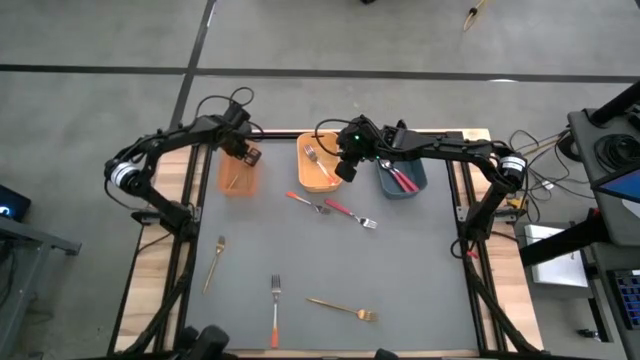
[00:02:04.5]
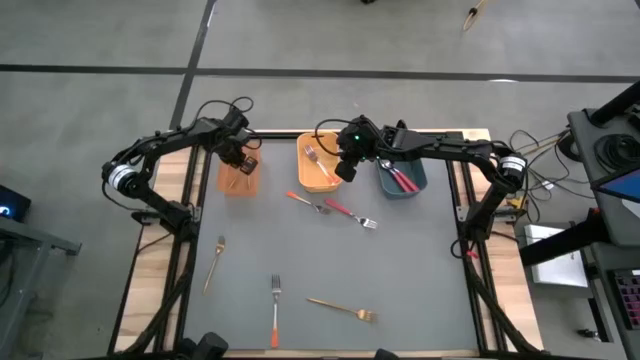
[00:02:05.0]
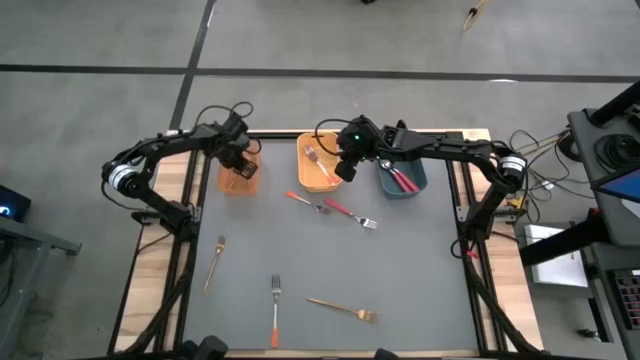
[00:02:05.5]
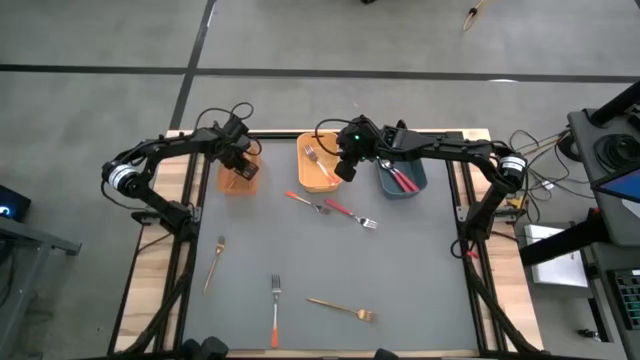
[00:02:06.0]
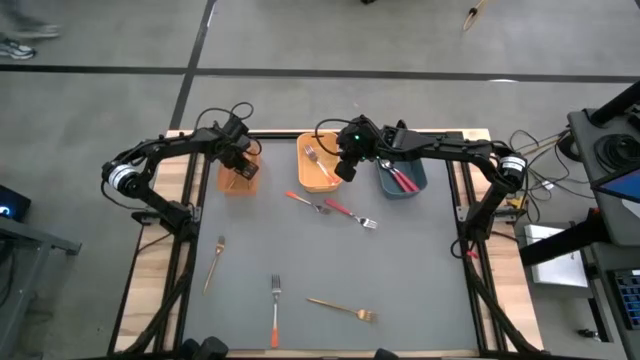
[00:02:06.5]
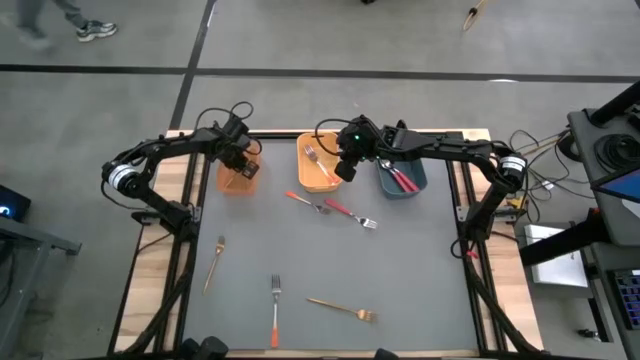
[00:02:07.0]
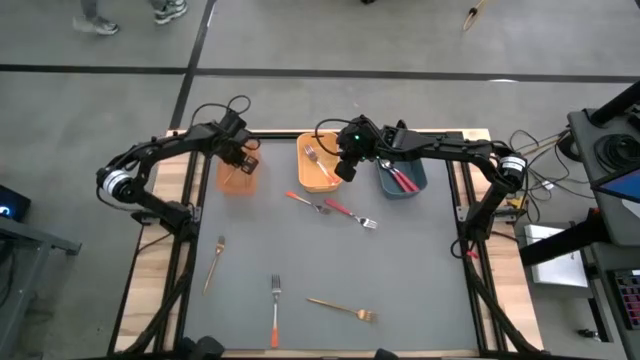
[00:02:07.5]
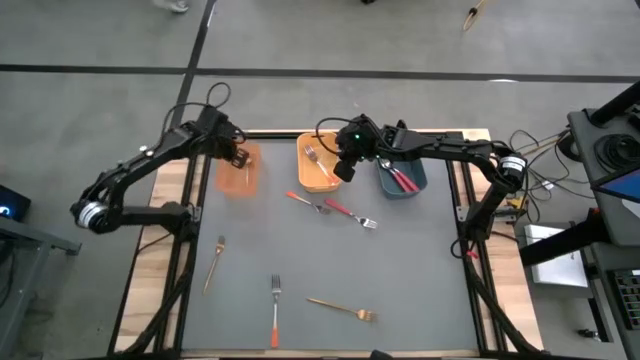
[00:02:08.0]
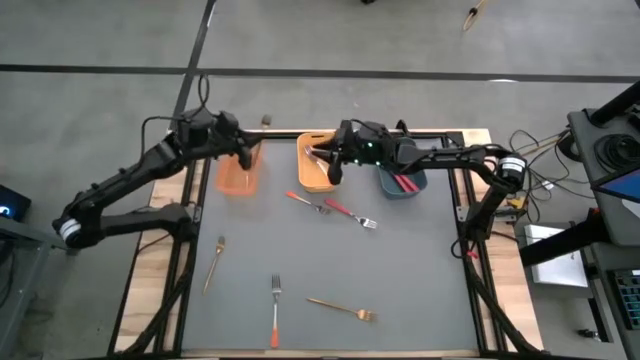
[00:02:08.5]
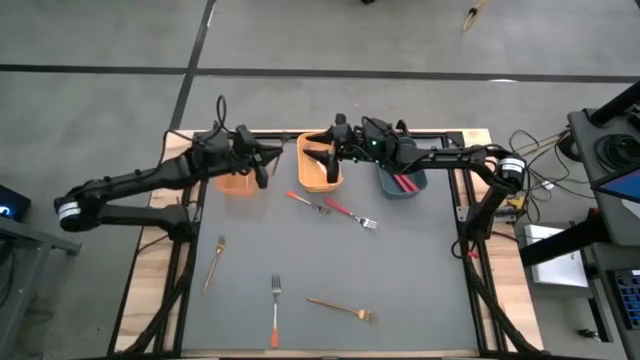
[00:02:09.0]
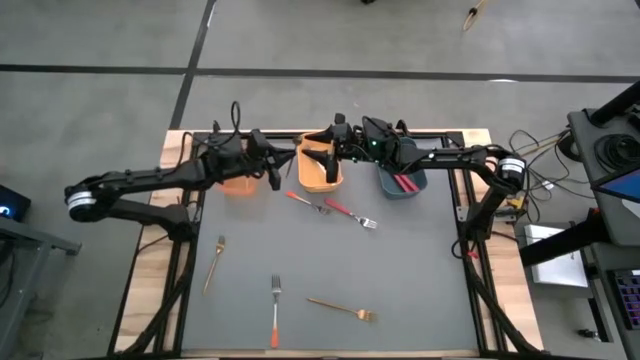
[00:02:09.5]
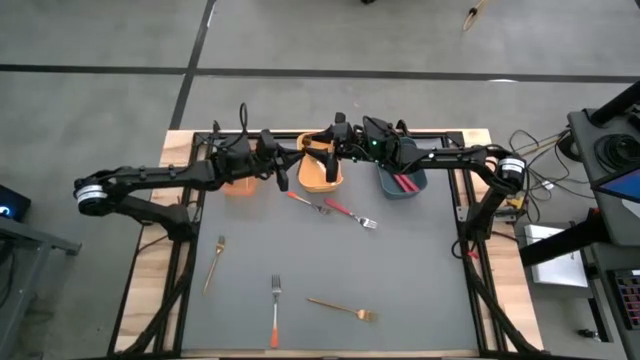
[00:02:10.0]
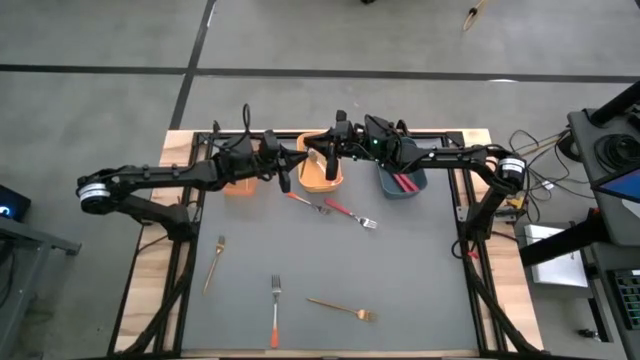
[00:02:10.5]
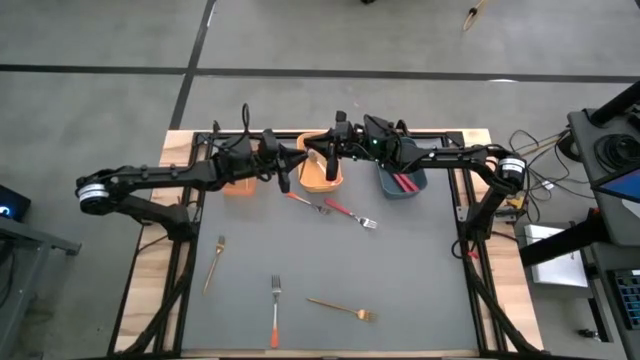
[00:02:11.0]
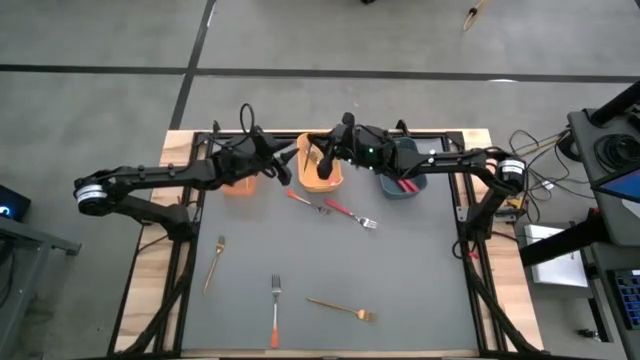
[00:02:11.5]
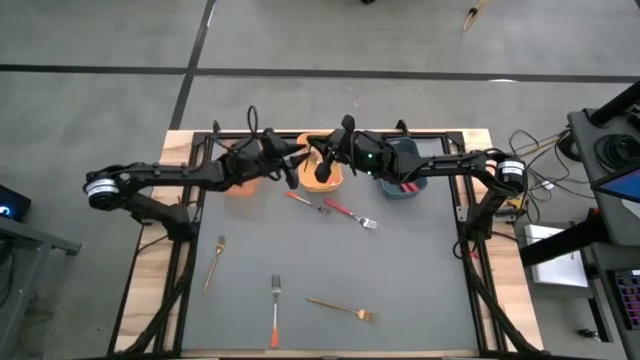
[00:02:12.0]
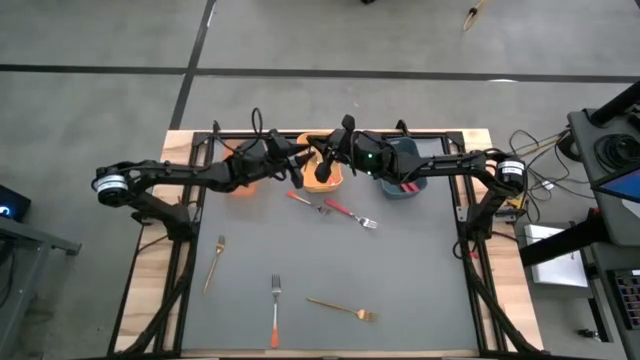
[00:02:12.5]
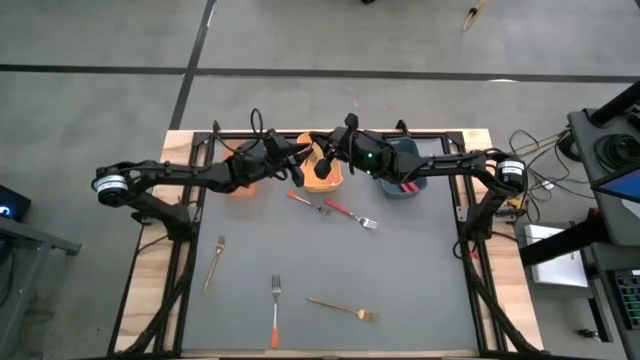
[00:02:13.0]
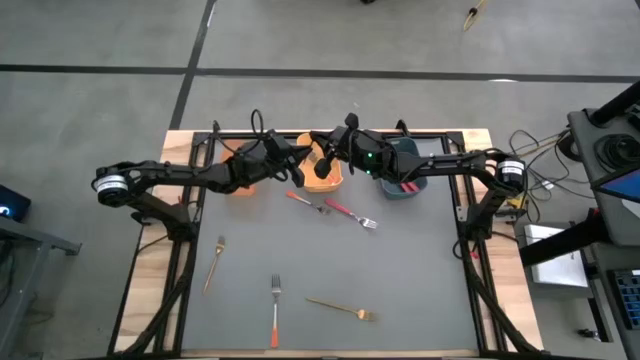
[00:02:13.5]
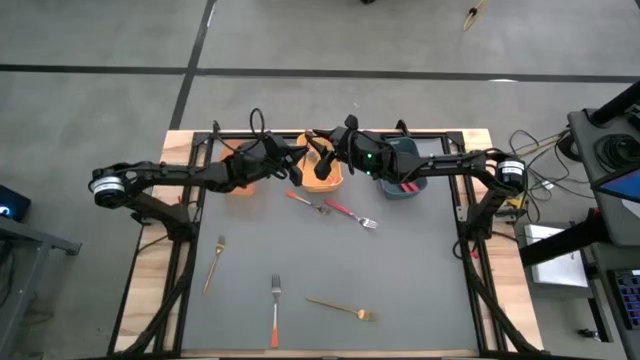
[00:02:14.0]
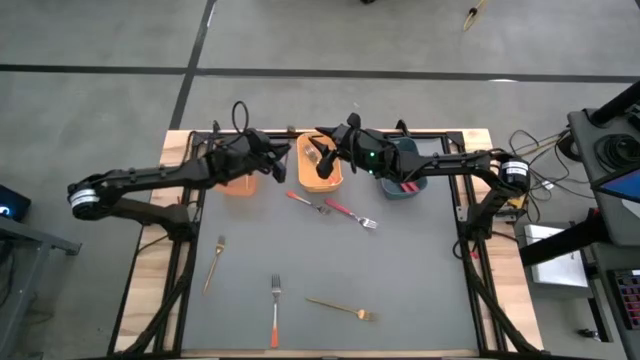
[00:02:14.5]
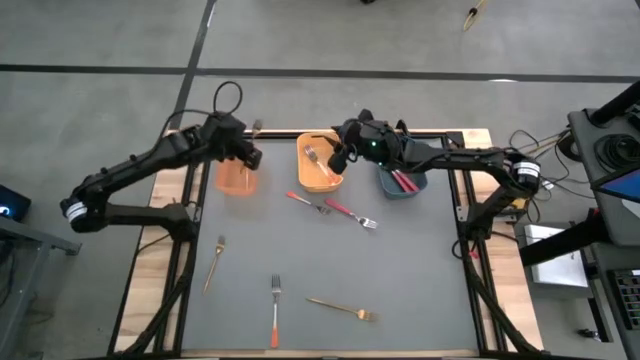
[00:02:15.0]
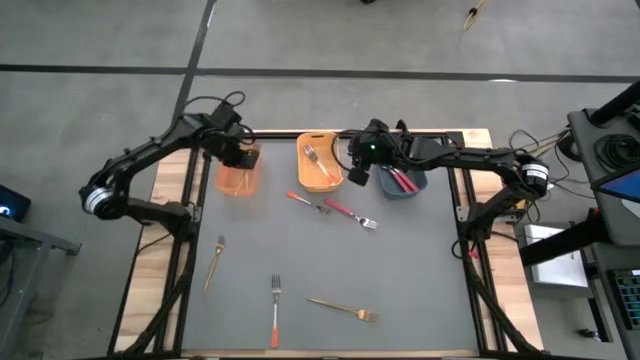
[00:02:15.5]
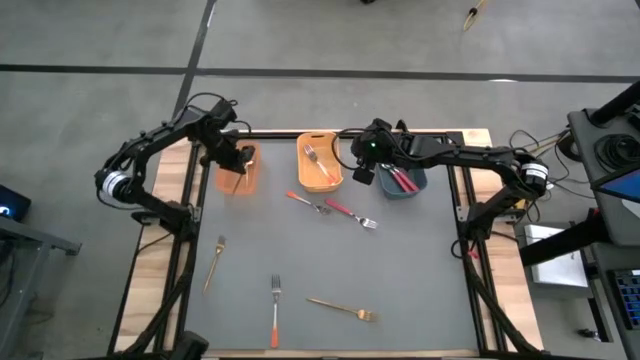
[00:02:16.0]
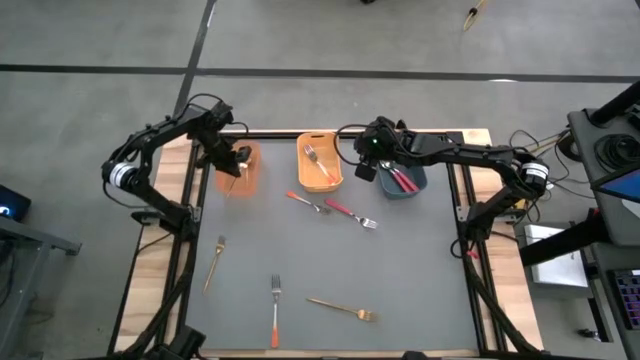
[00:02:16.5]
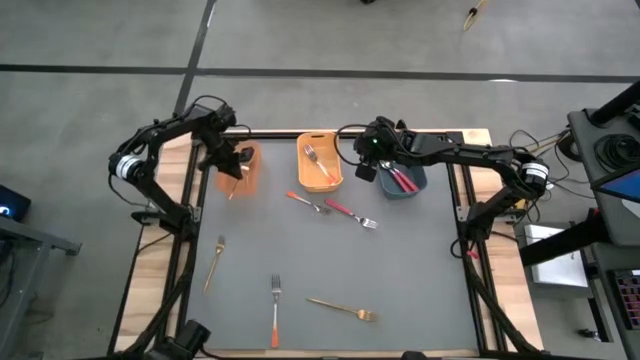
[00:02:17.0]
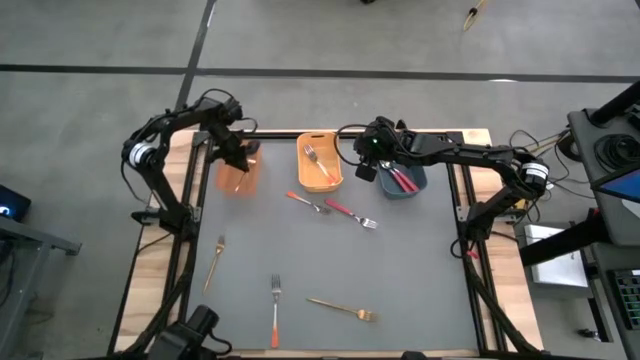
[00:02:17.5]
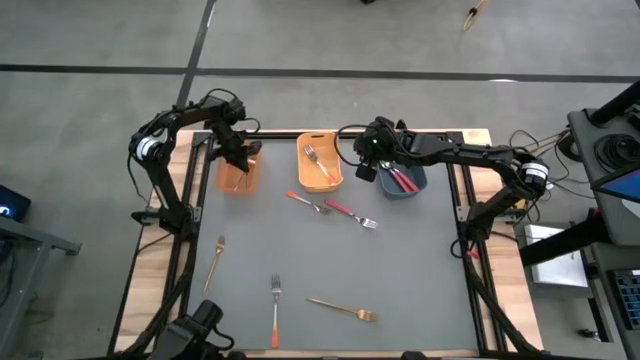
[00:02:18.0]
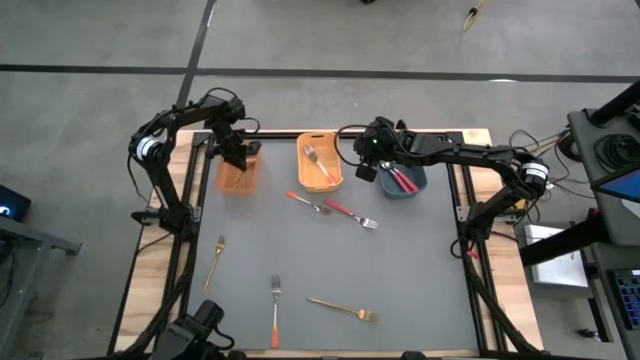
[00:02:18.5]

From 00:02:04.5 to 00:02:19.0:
Task: Sort silverware by color (type)
Adjust the gold fork in the orange bin

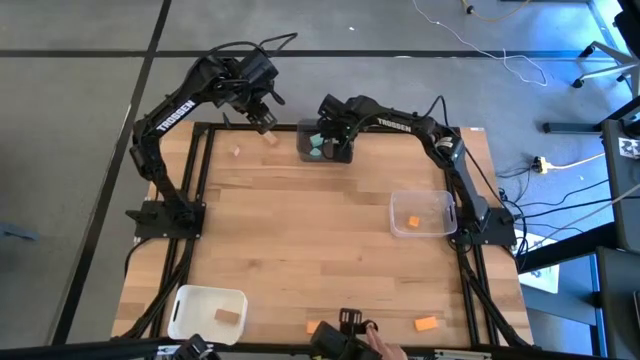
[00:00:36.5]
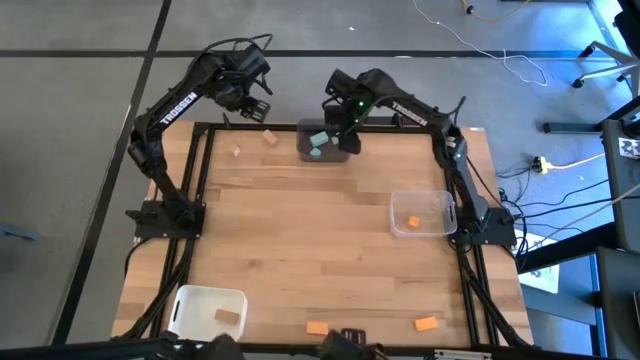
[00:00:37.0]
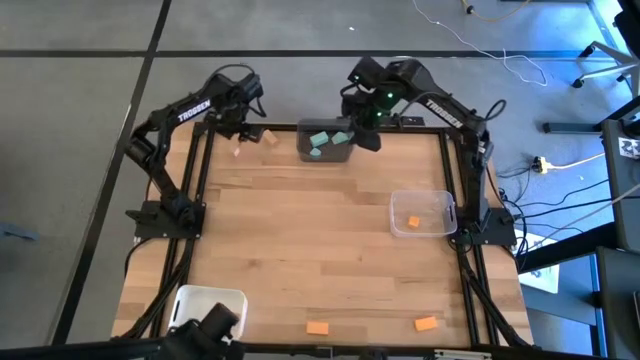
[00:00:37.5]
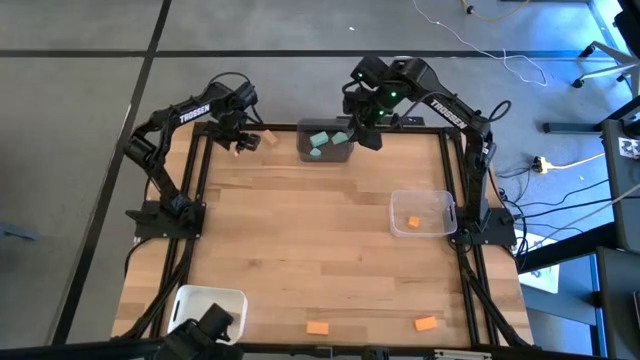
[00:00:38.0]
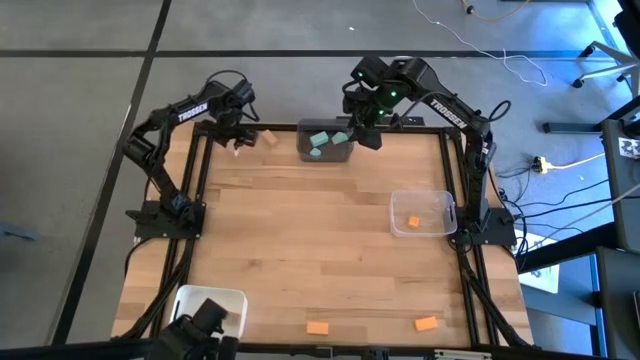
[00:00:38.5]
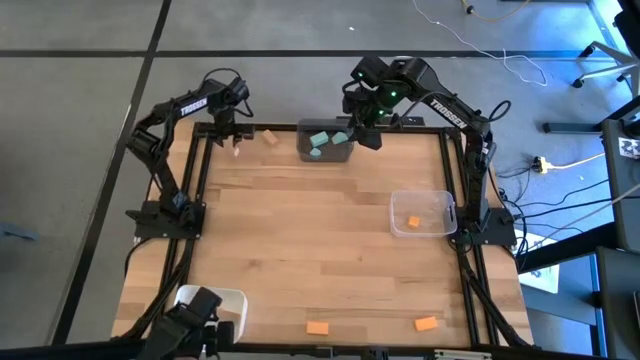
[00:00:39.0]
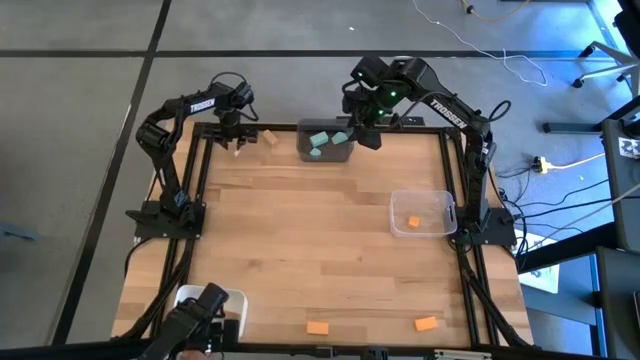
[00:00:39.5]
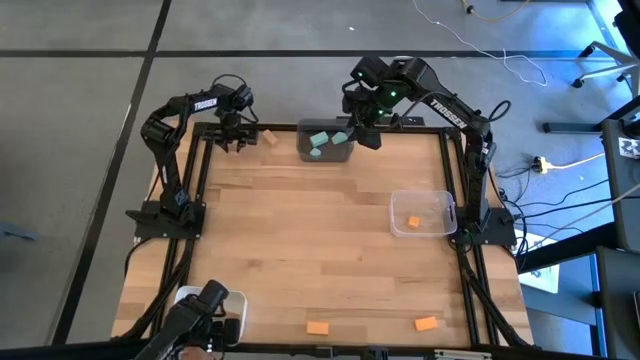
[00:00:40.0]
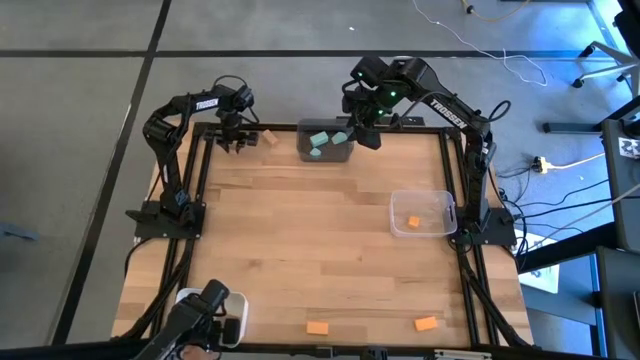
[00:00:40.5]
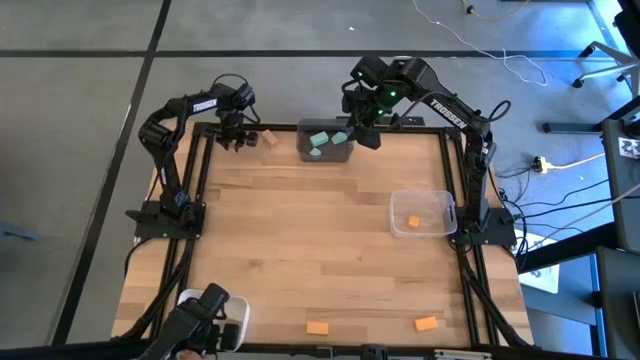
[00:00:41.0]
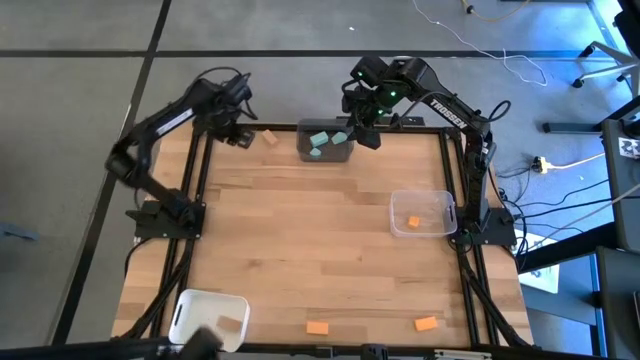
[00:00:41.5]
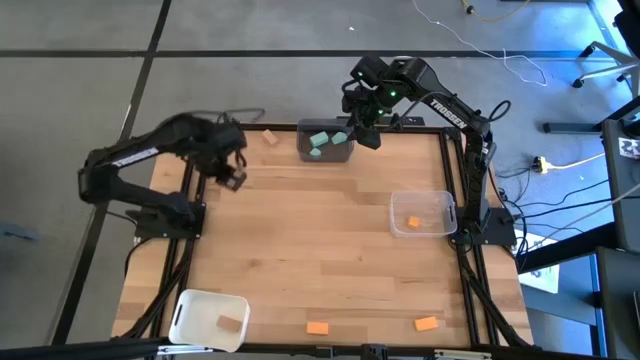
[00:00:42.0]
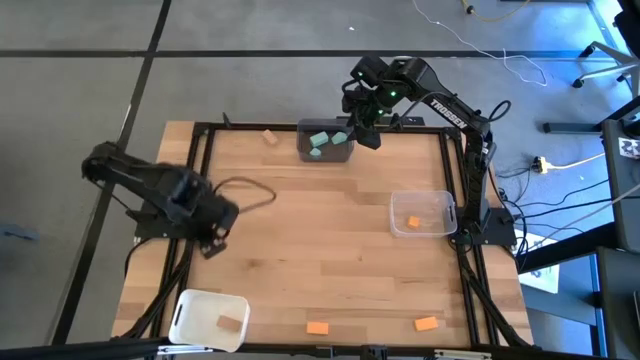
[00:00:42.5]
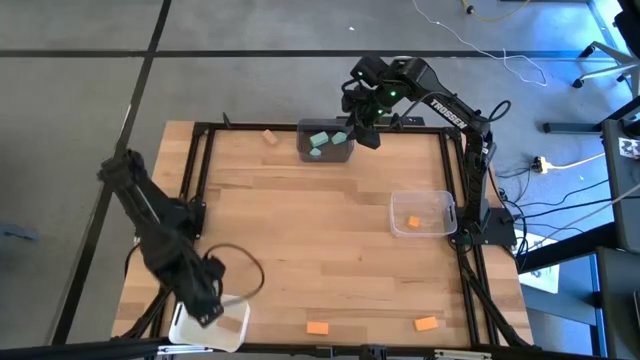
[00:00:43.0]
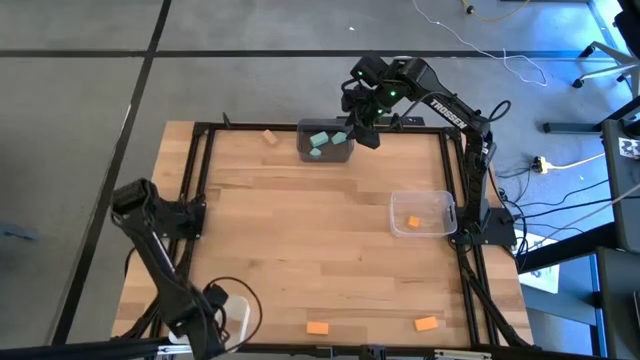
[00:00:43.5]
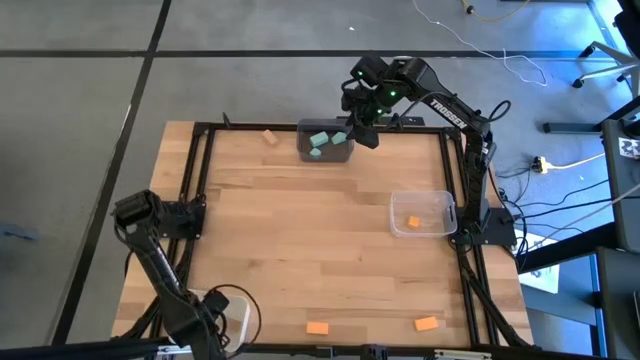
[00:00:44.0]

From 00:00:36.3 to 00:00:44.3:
Task: Sort & place blocks by color
Put the left brown block into the white bin
